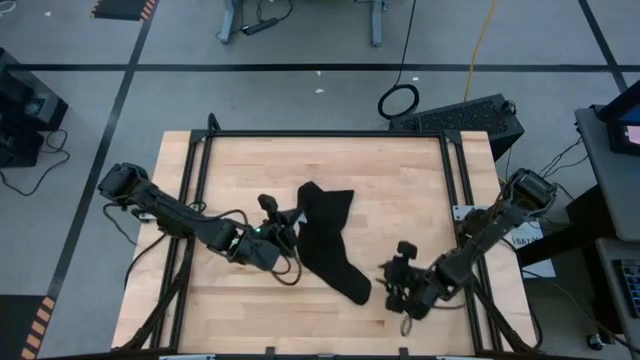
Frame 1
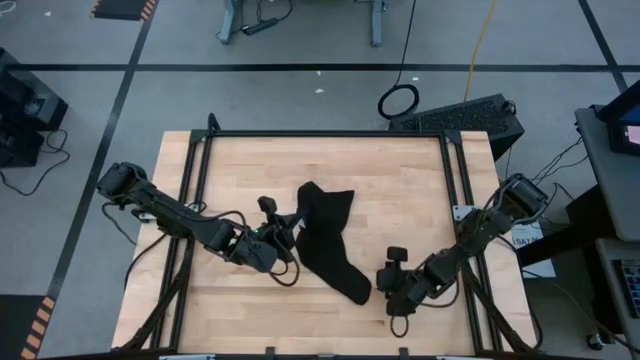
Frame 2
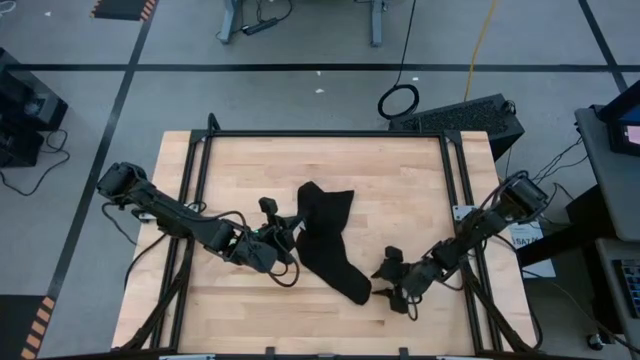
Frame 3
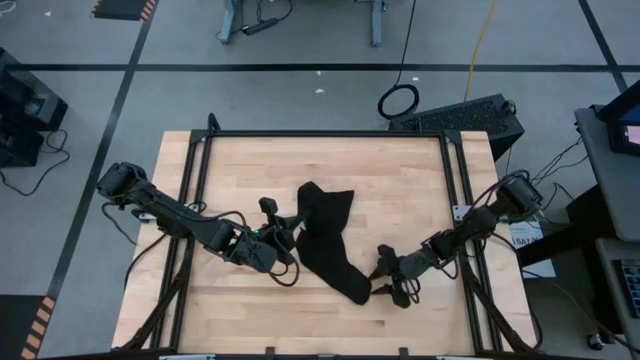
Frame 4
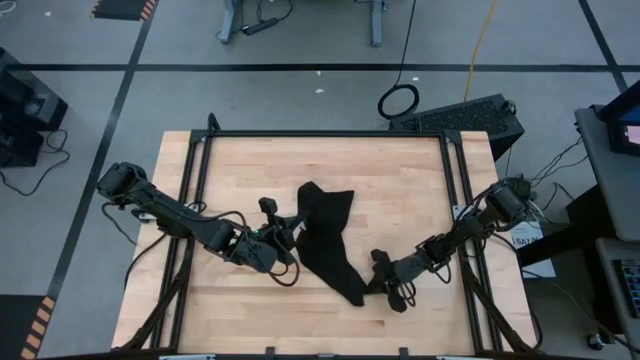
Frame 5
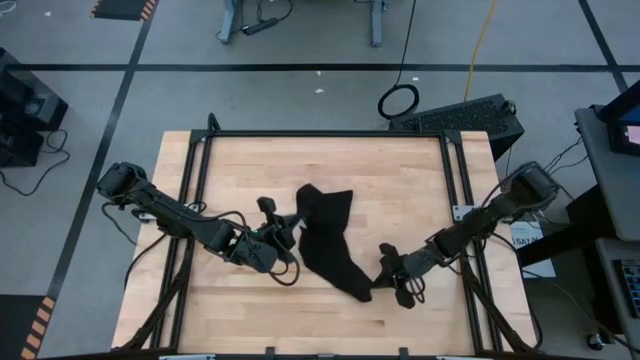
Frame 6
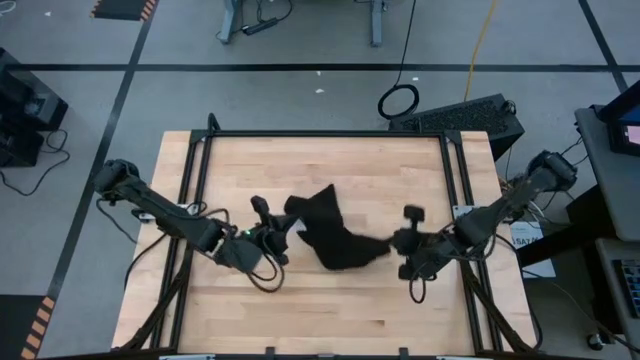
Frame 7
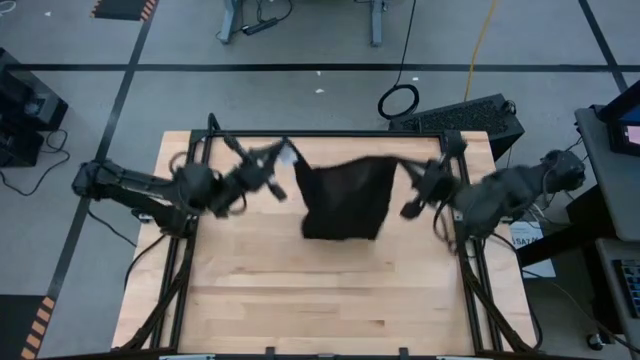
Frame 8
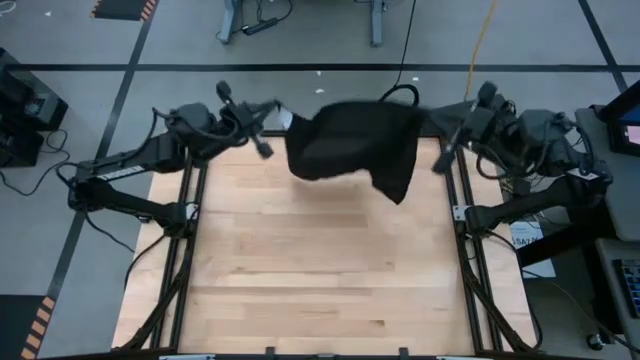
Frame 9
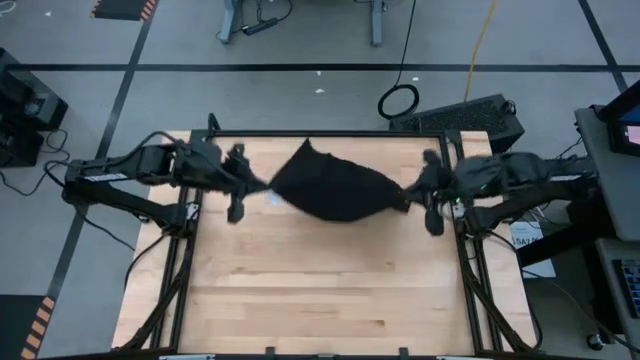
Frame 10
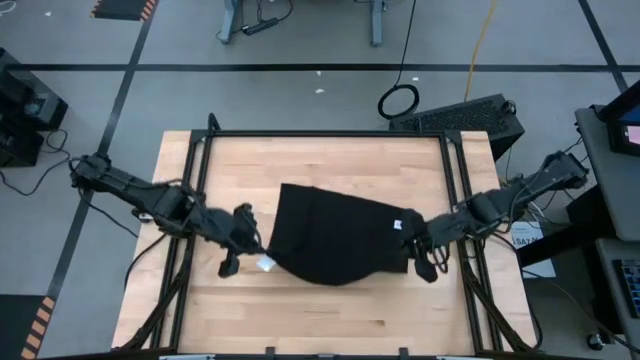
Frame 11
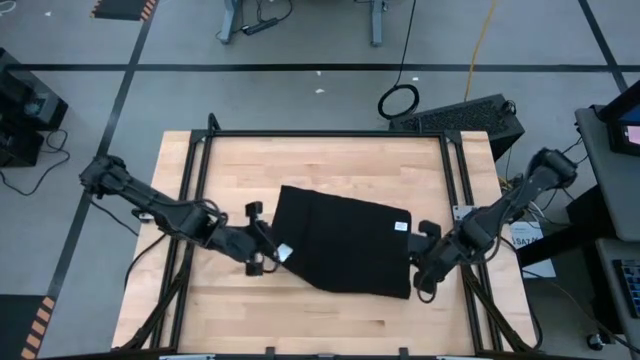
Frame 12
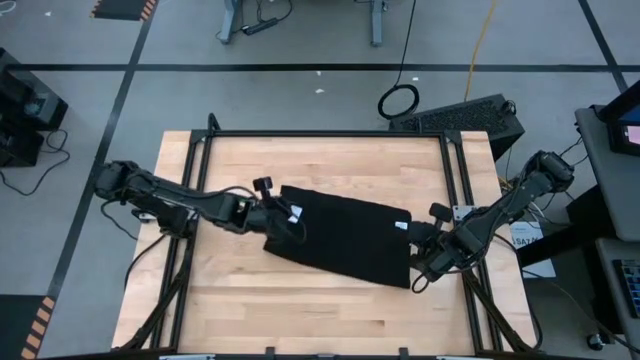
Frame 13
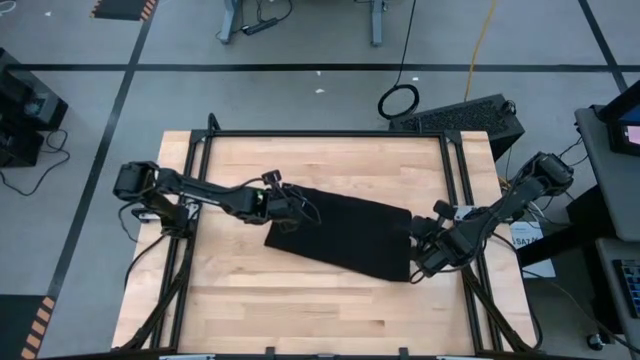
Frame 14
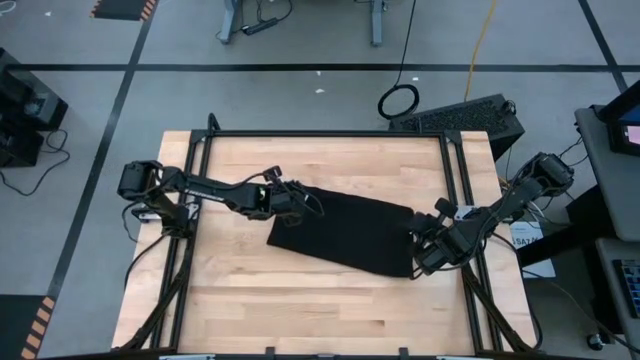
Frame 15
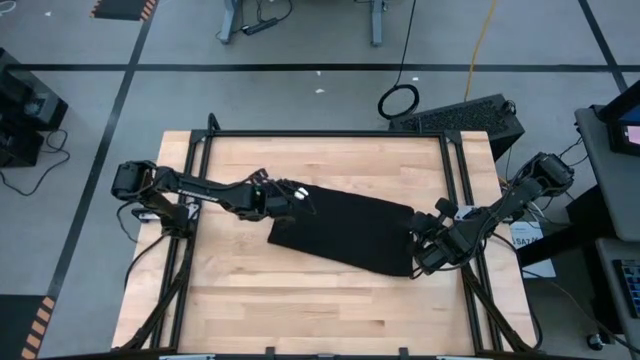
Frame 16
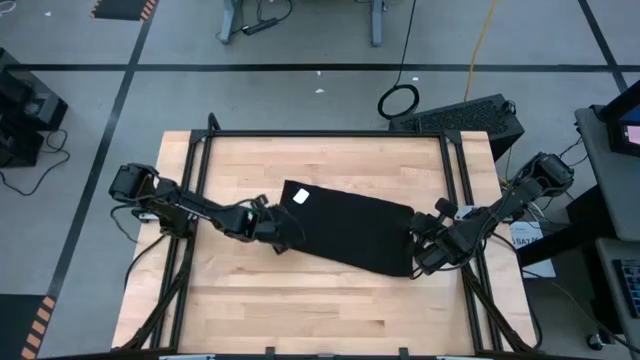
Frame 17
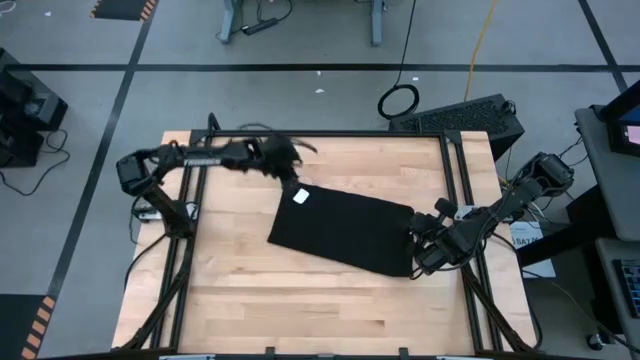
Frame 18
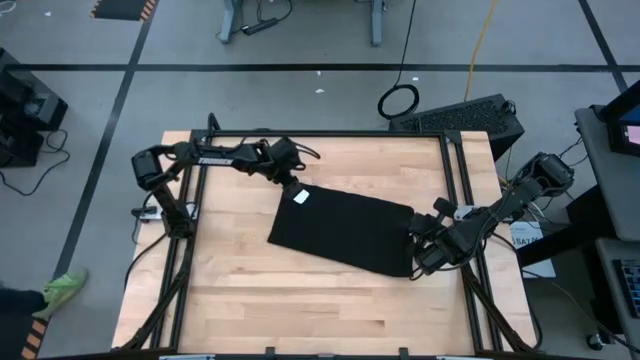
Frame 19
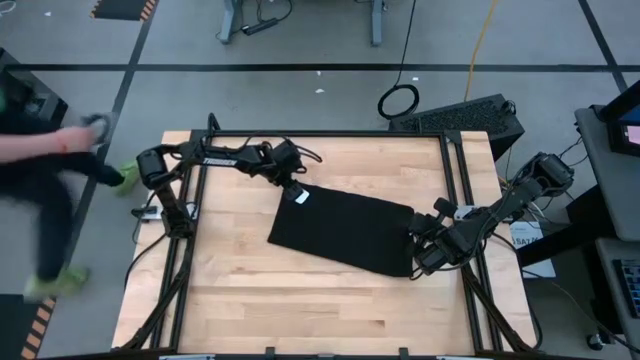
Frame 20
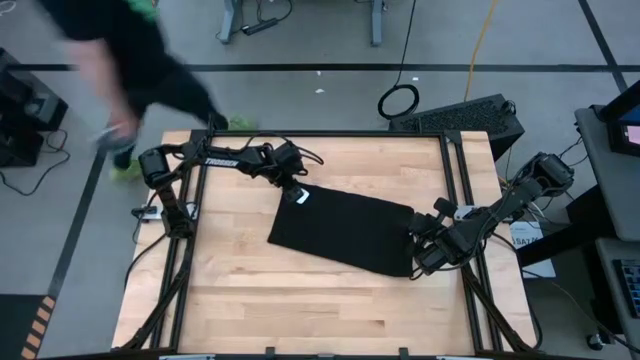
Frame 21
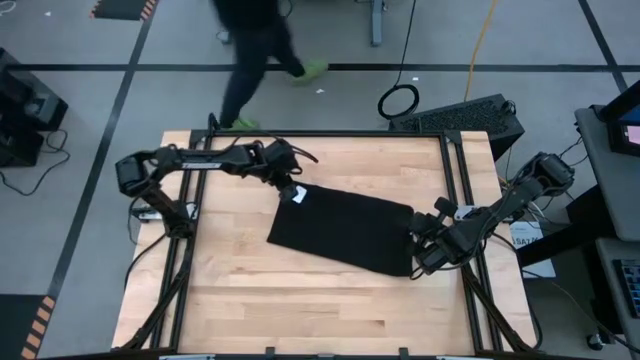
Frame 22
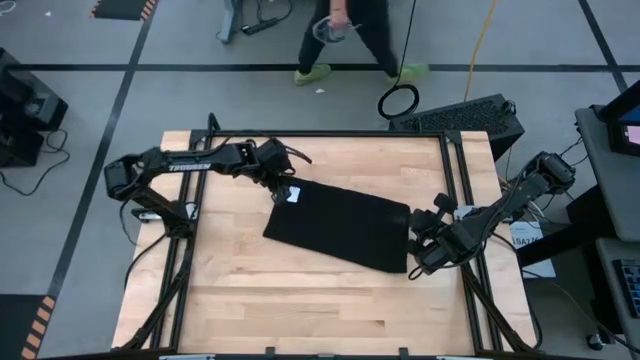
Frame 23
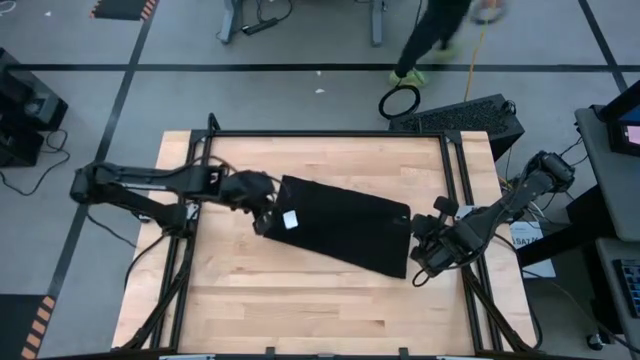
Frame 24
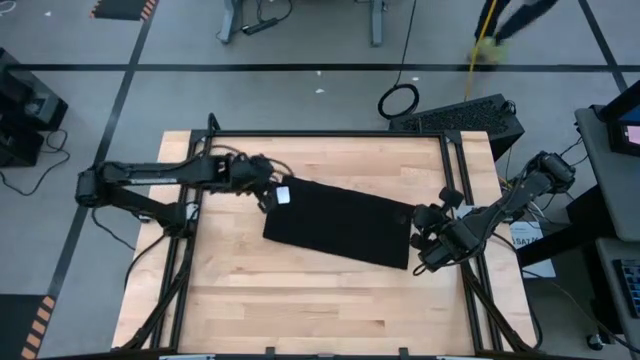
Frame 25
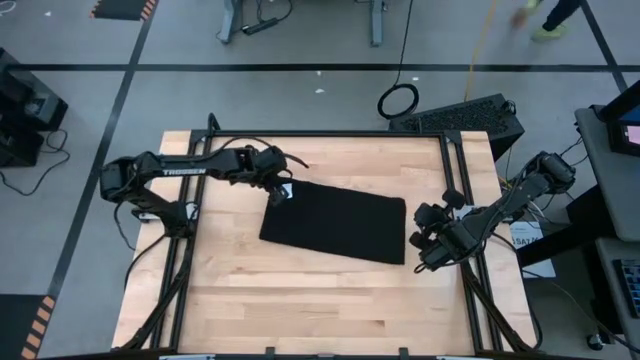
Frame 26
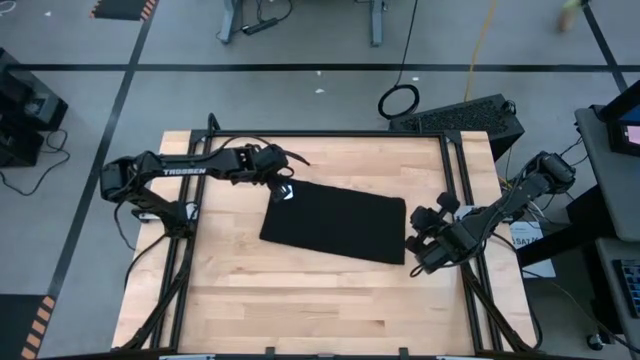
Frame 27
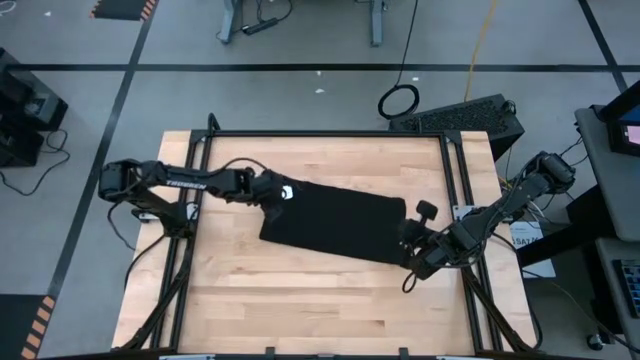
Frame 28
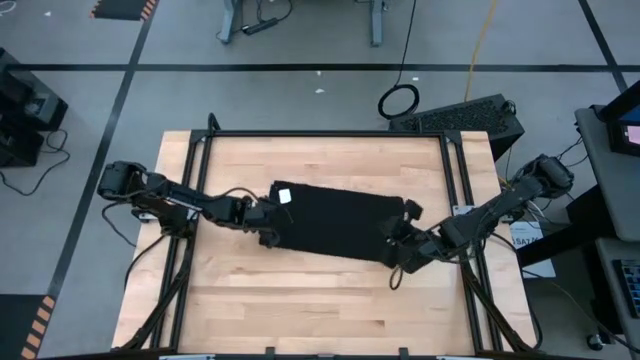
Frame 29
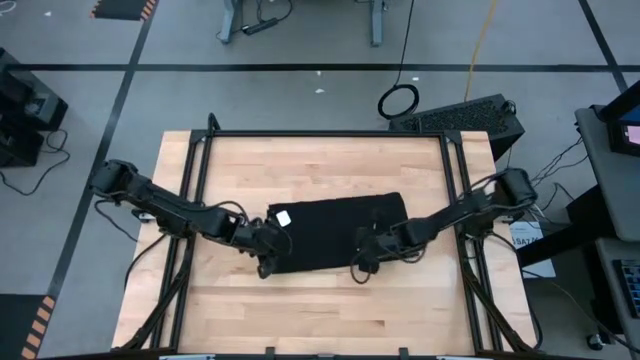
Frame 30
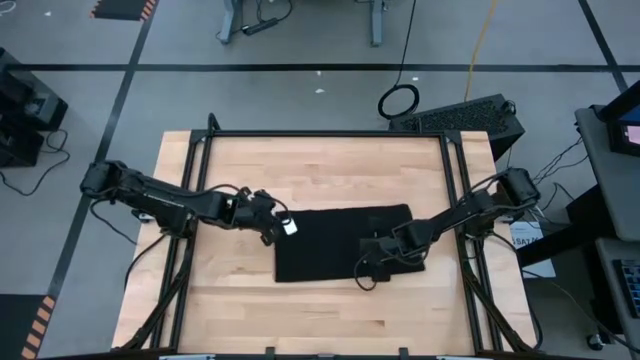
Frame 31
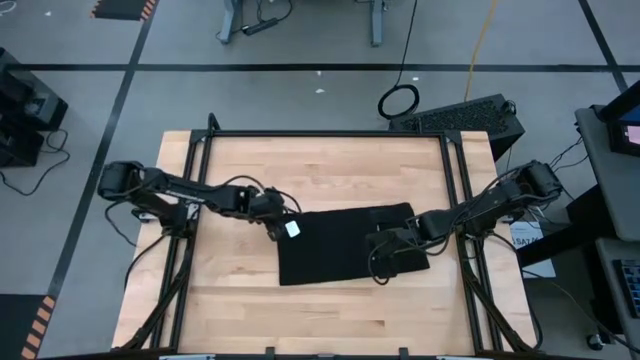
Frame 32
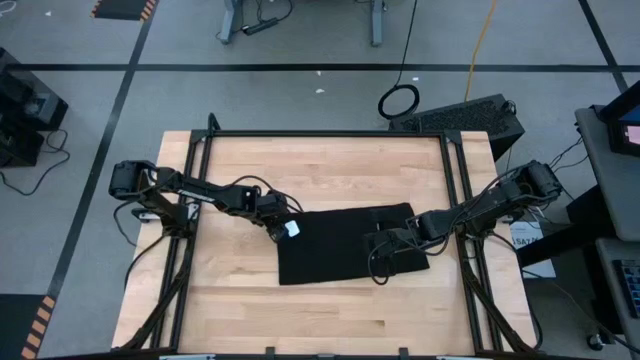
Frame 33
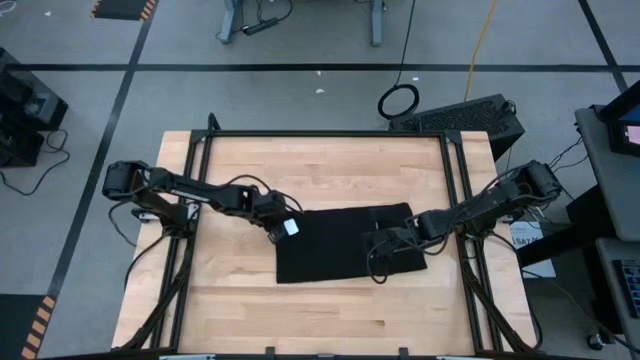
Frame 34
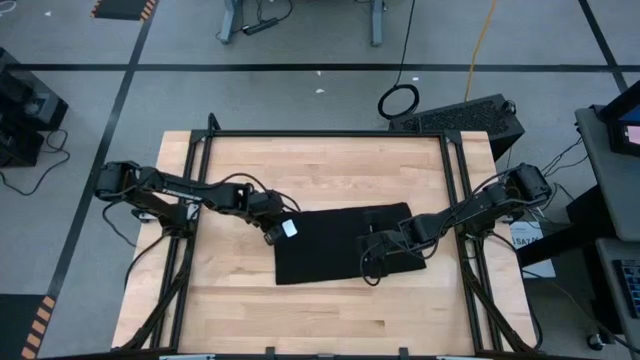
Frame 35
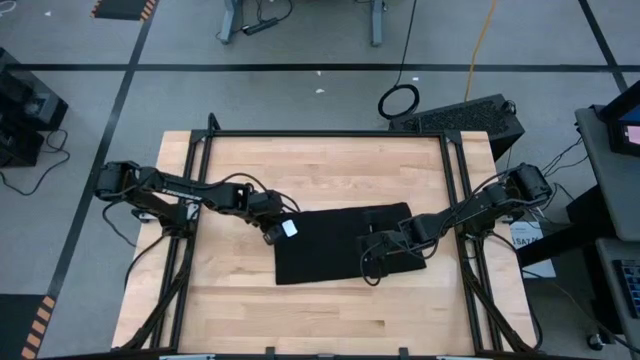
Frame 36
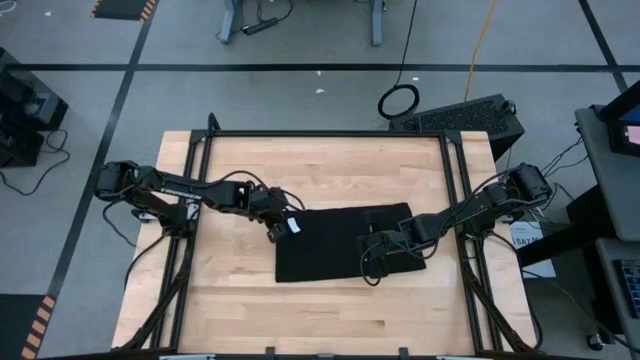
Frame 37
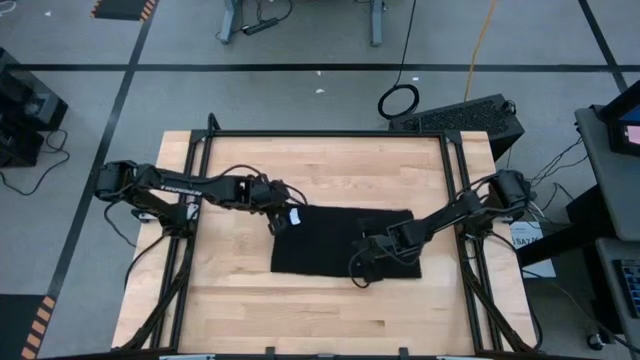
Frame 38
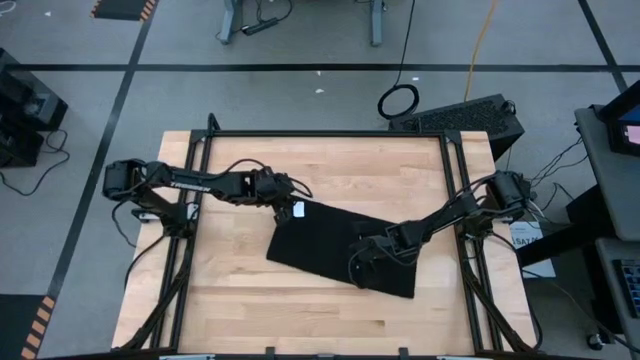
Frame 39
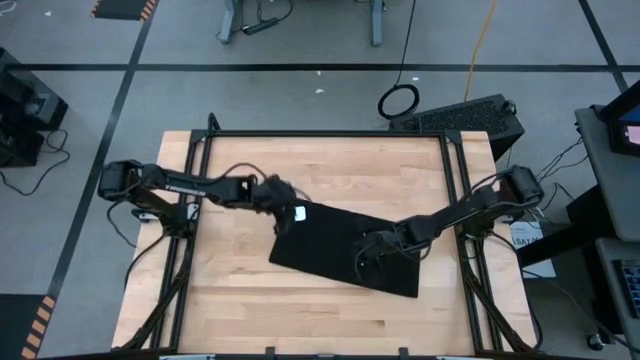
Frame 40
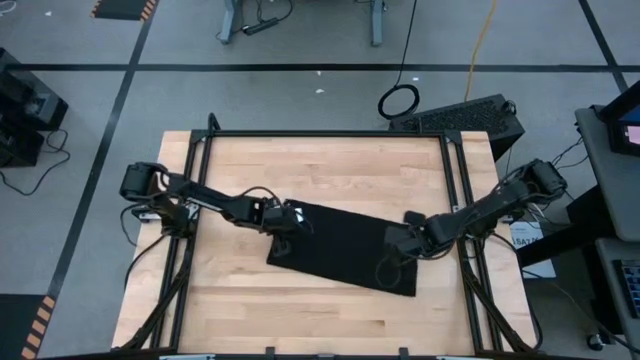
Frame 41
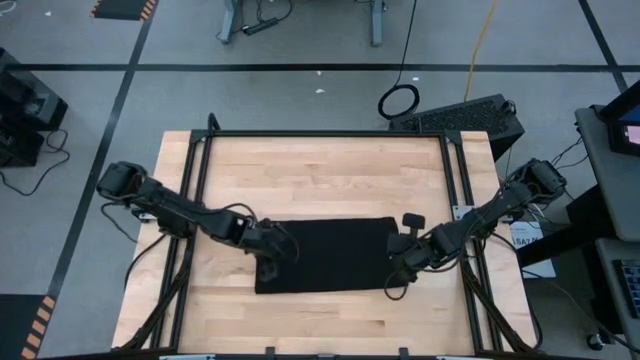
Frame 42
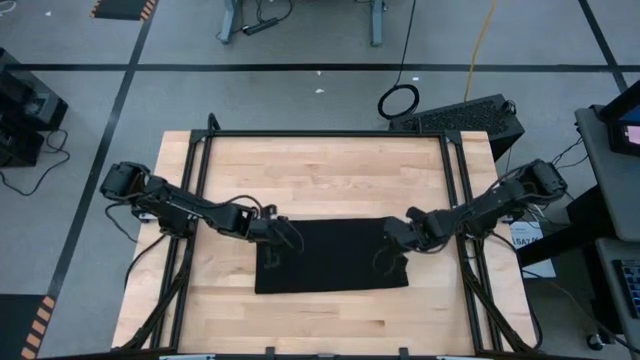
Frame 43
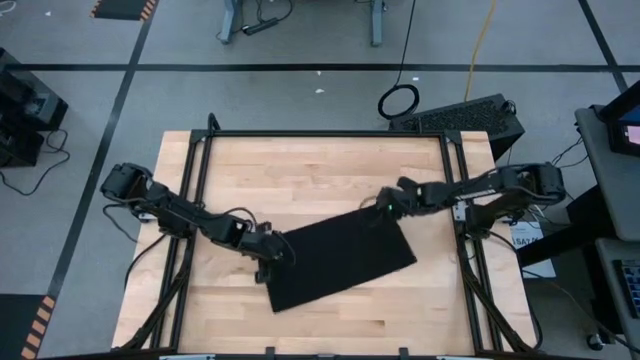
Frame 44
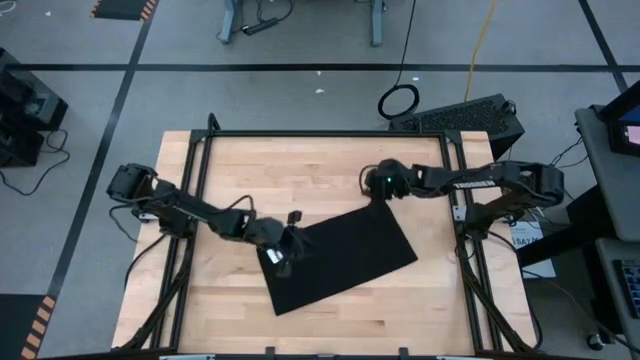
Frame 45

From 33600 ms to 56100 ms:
Task: Roll towel
Roll the black microfiber towel
